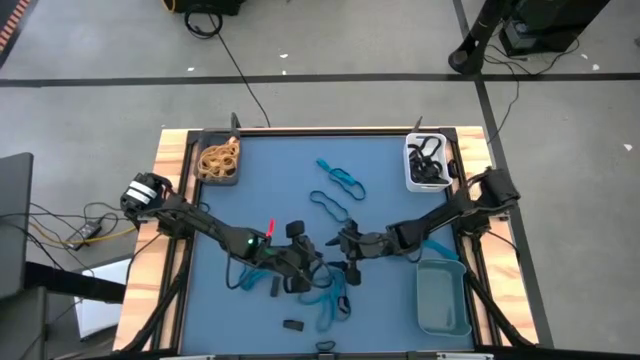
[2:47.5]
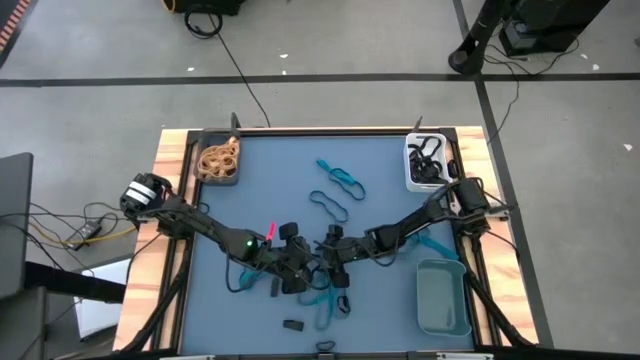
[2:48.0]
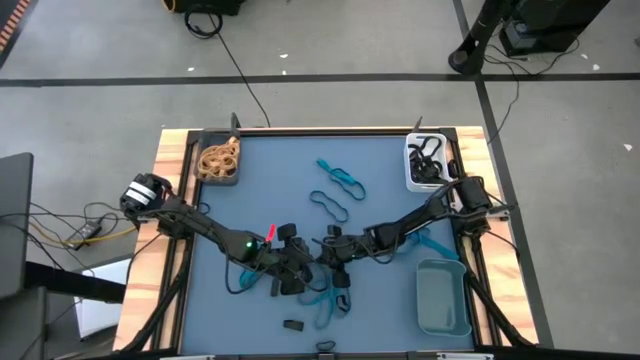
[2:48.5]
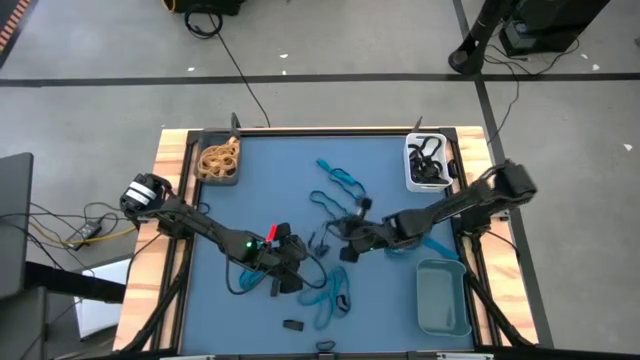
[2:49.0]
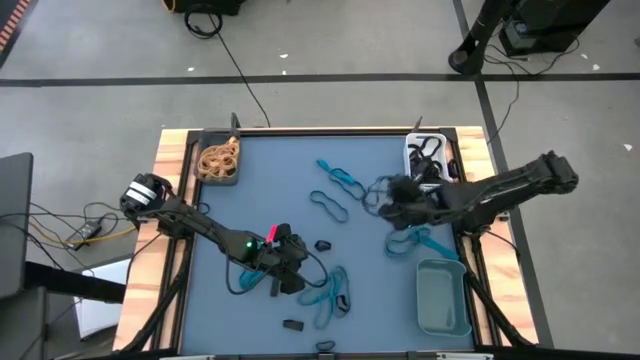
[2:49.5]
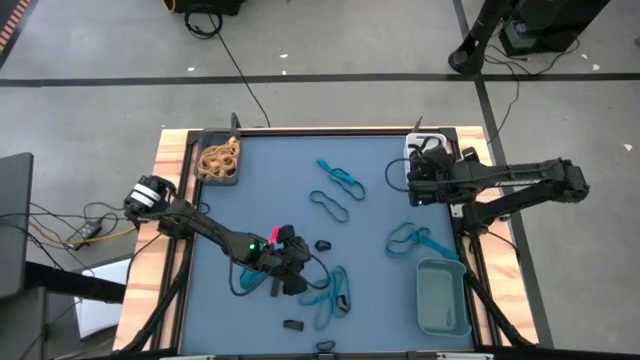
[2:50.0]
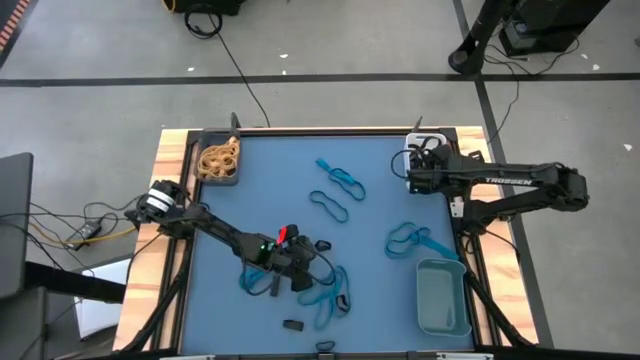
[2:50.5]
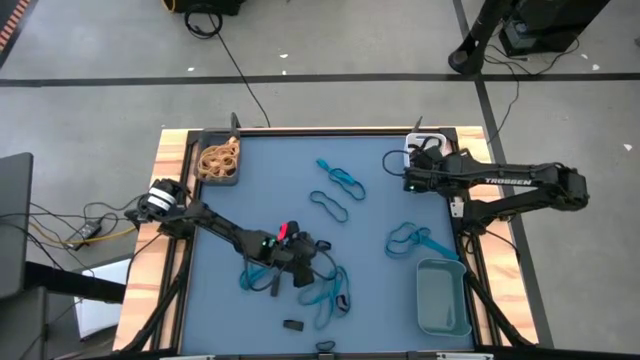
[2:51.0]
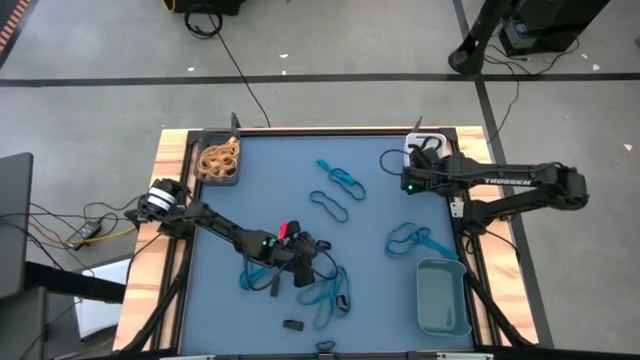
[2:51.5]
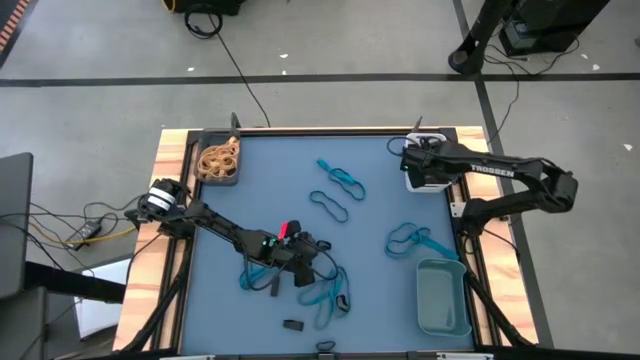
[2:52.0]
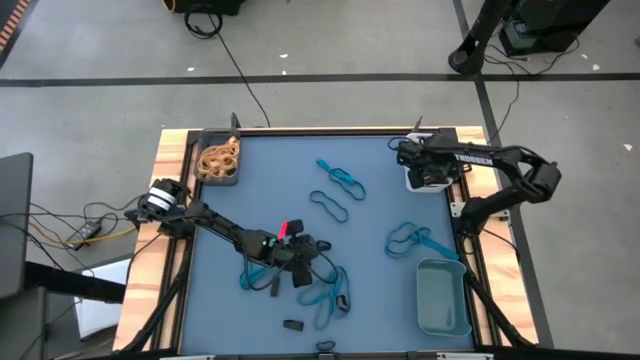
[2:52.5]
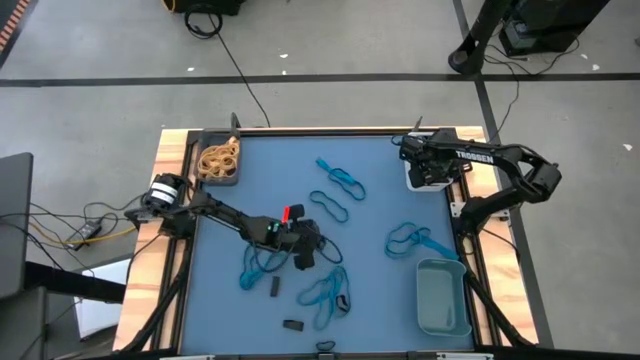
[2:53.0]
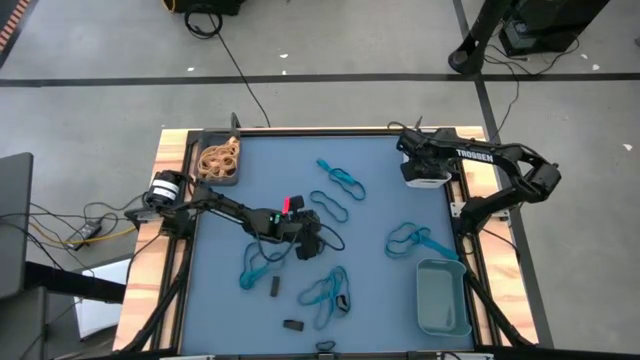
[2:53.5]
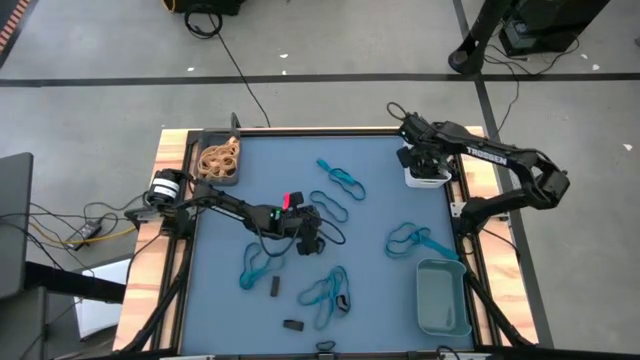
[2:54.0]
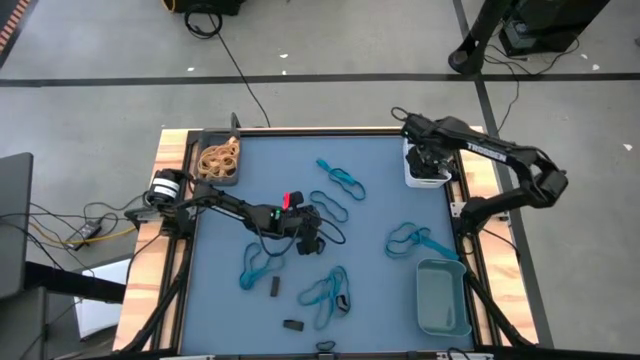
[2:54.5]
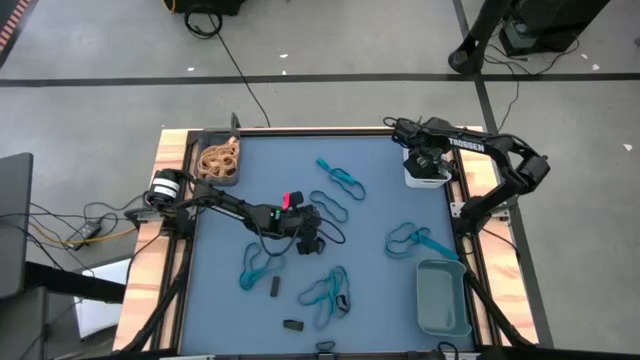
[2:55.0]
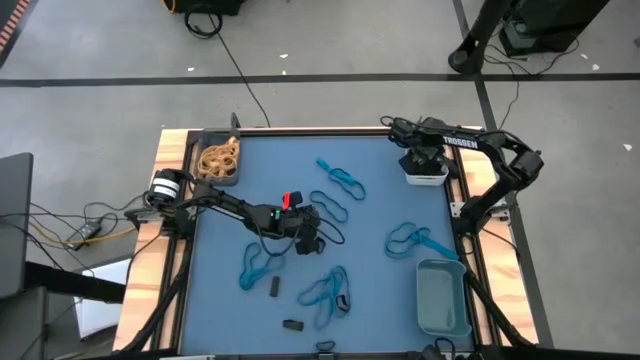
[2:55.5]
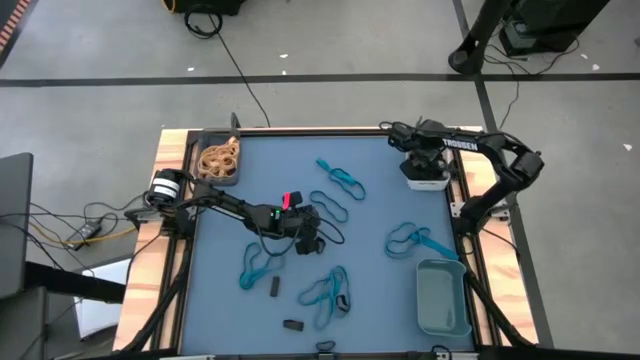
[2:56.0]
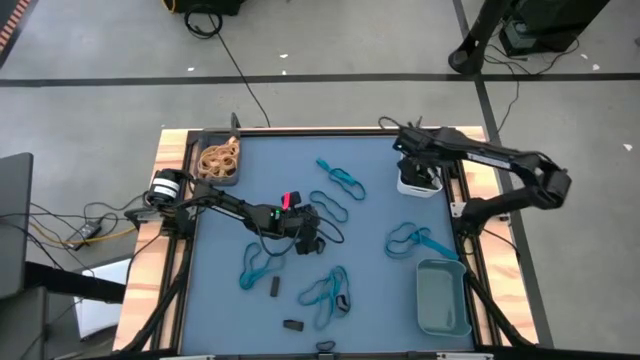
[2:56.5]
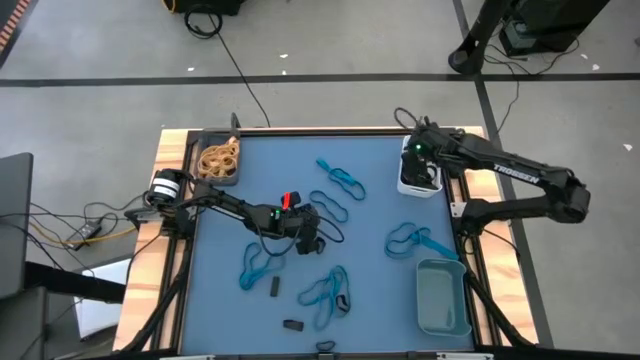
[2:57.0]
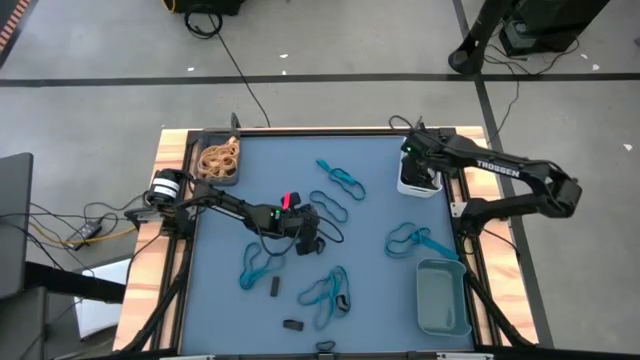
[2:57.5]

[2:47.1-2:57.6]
Task: Sort rubber bands into baskets
Put the black rubber band into the white bin

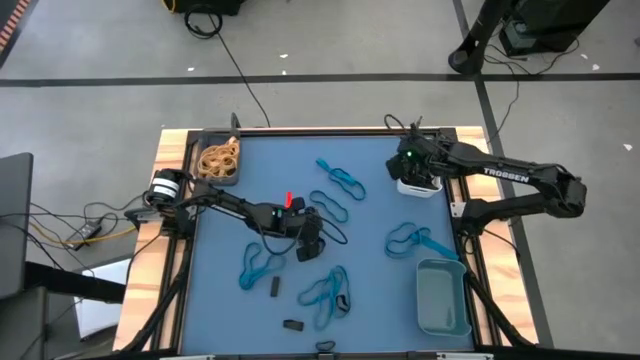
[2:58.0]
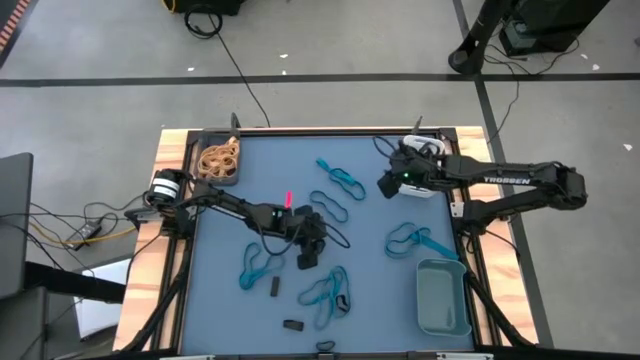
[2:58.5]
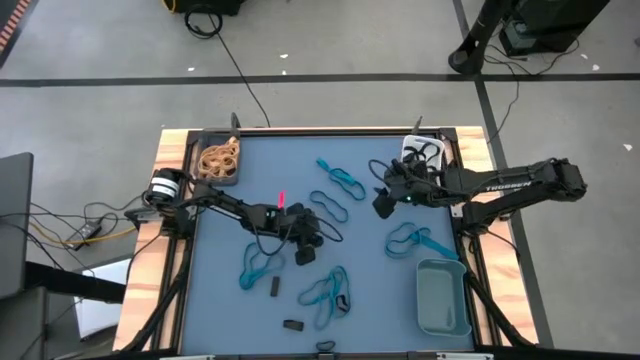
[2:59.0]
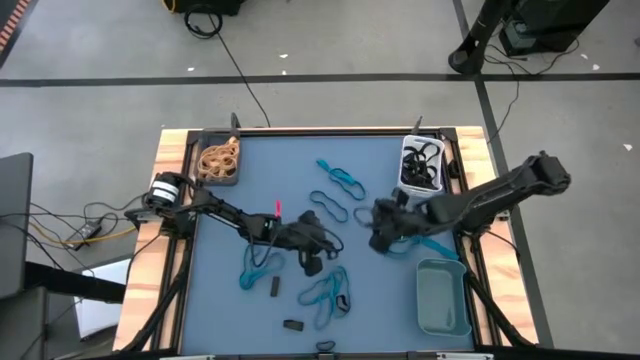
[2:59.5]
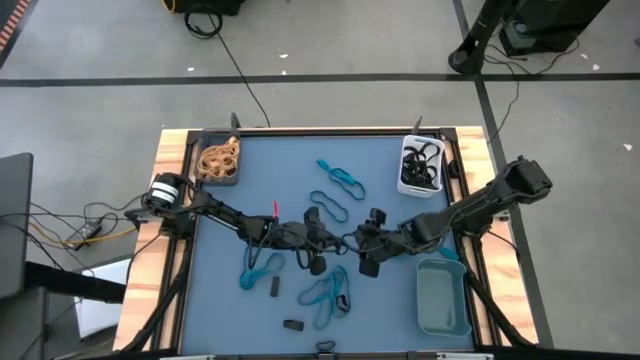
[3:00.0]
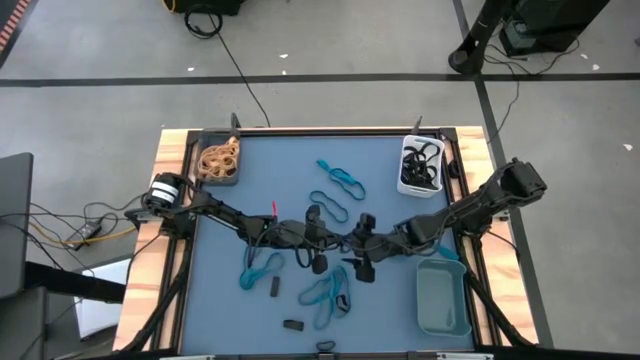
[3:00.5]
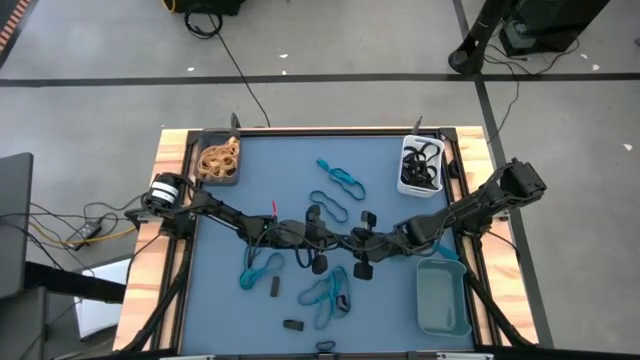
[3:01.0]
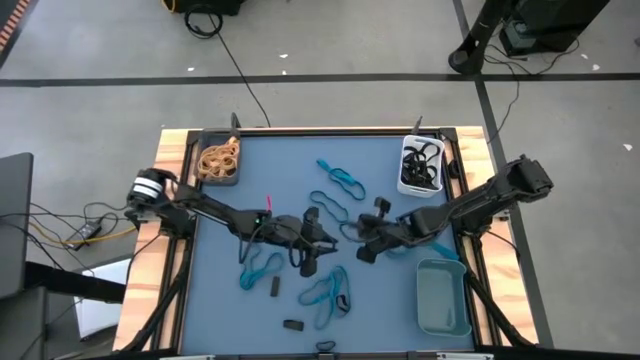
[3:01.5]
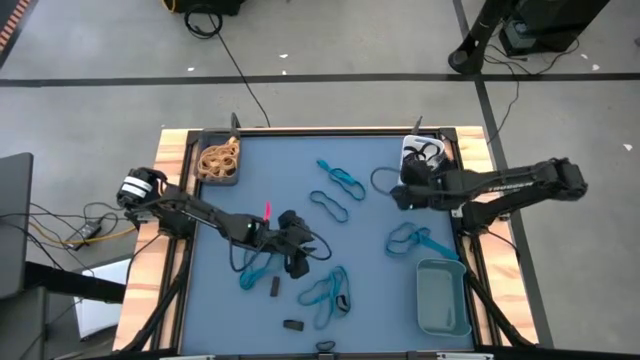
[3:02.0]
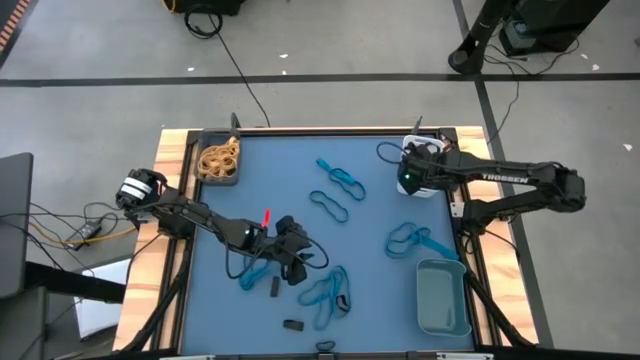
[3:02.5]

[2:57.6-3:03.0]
Put the black rubber band into the white bin

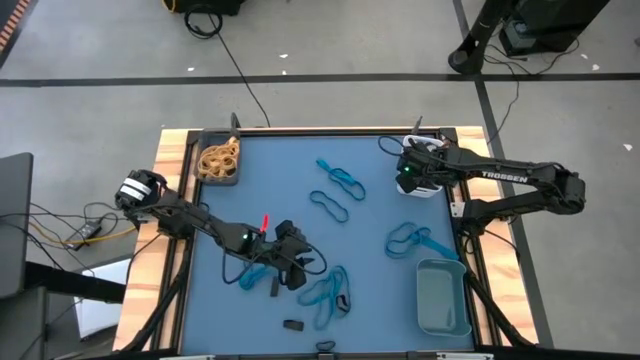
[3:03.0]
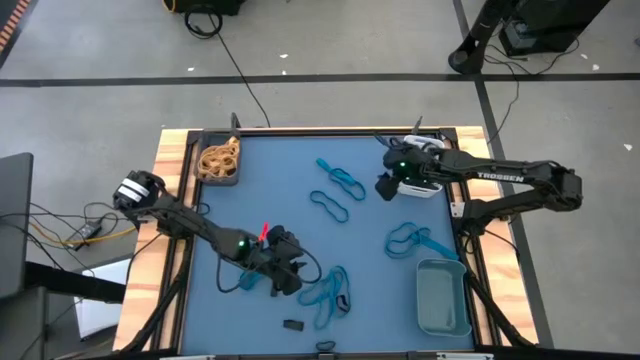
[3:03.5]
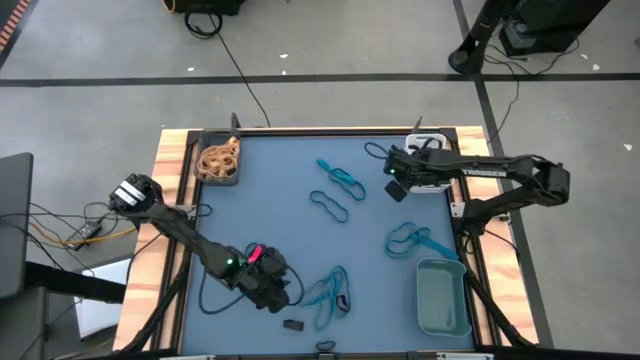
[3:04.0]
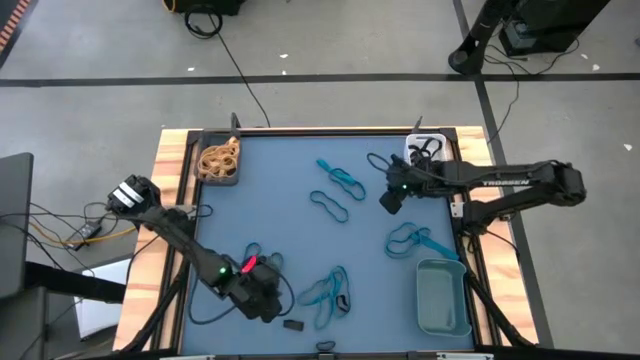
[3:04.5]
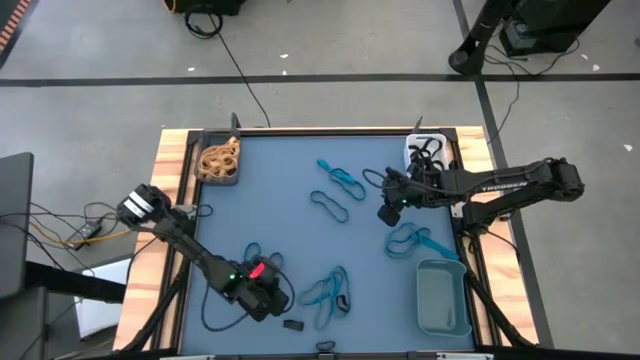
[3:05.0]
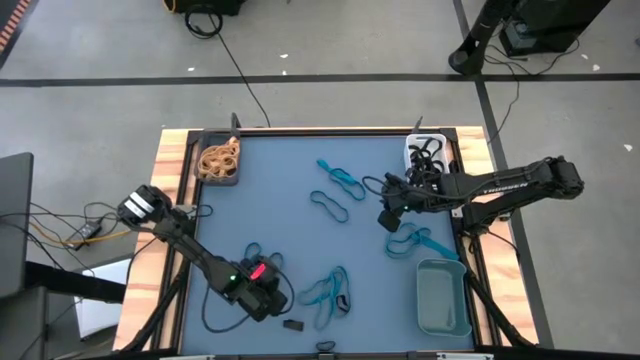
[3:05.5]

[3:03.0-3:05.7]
Put the black rubber band into the white bin

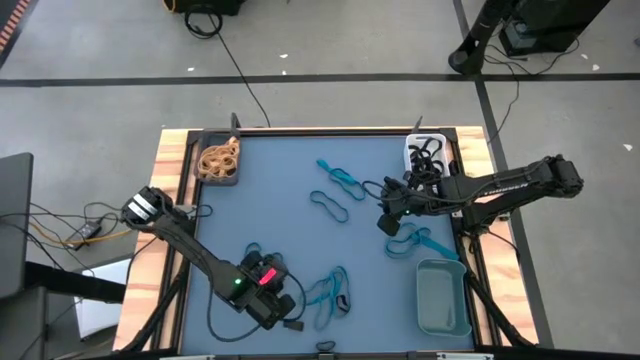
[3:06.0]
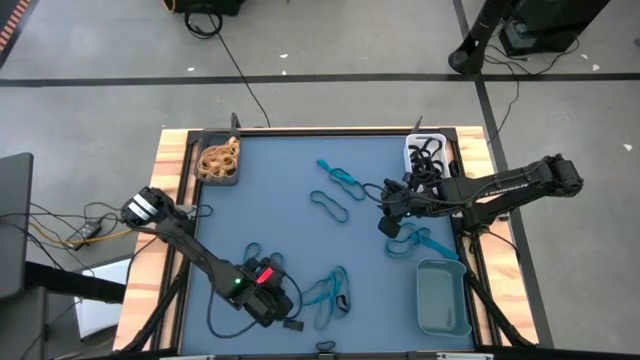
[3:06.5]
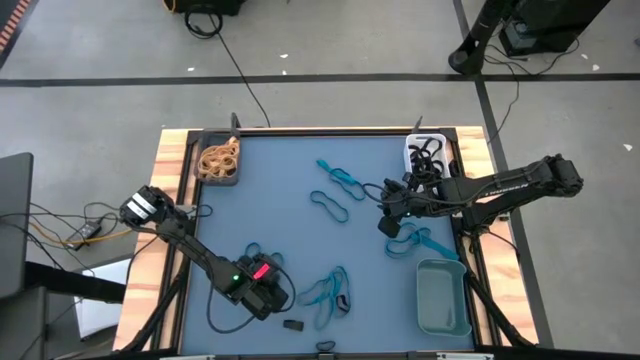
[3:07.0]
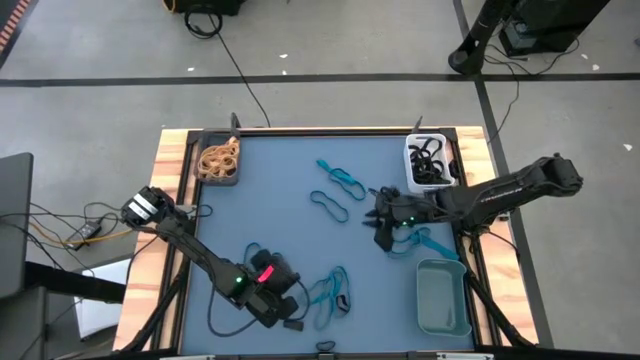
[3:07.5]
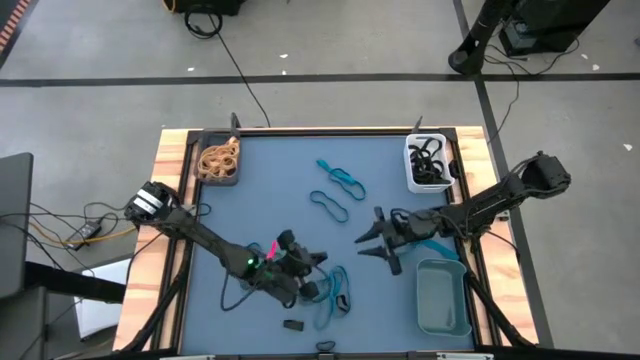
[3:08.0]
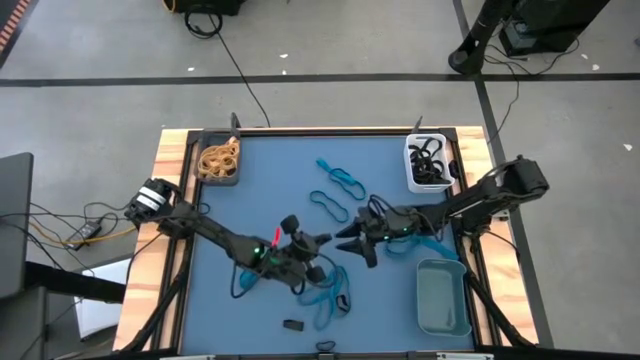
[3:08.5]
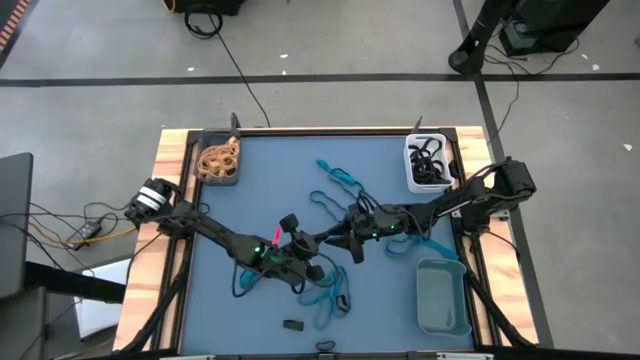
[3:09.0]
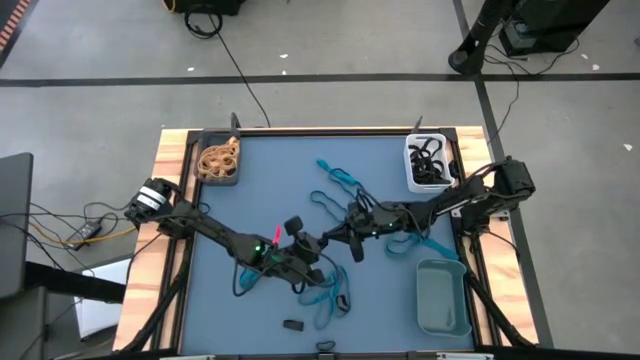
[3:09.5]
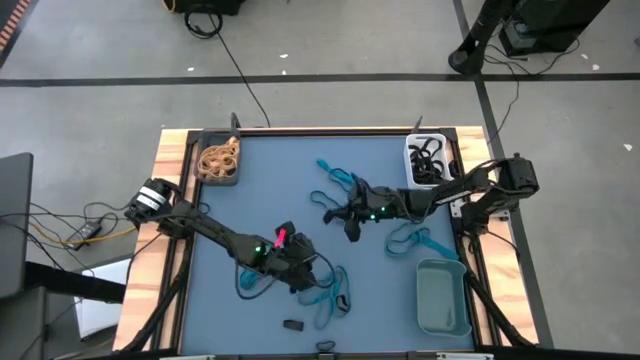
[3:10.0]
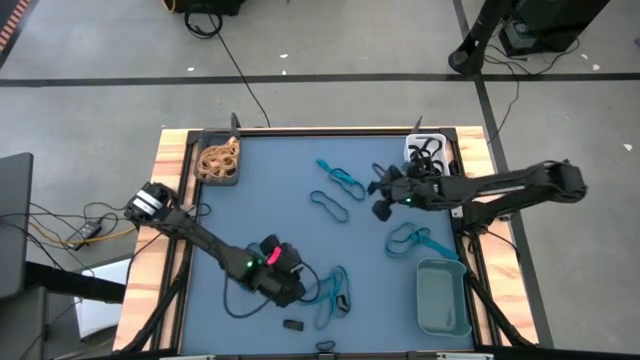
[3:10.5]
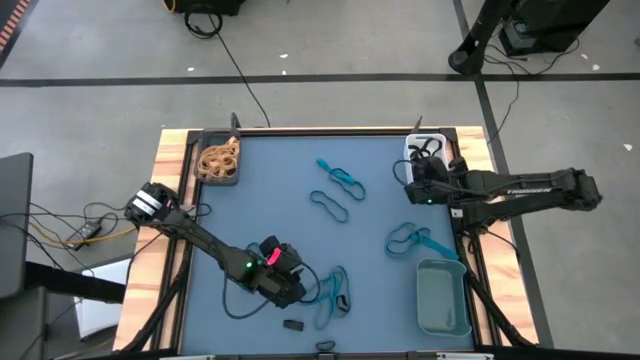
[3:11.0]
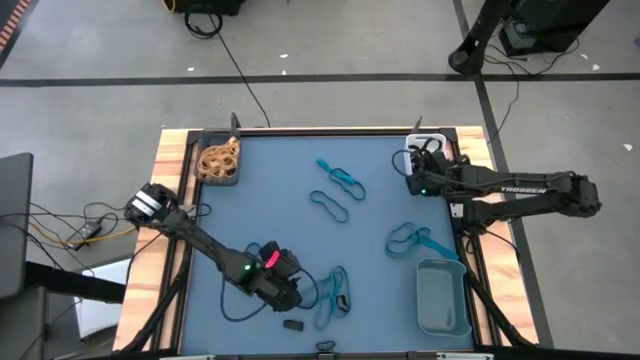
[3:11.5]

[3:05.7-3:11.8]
Put the black rubber band into the white bin
